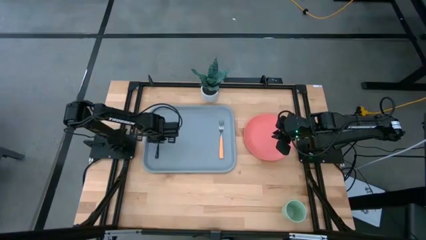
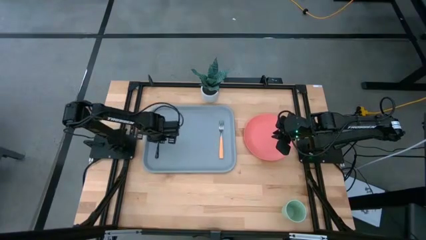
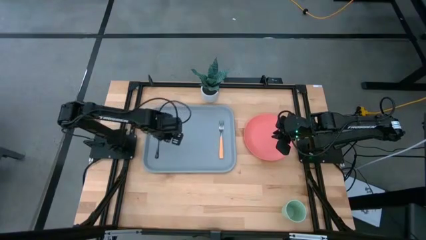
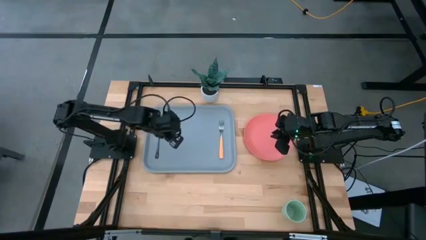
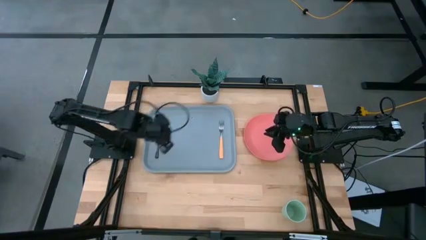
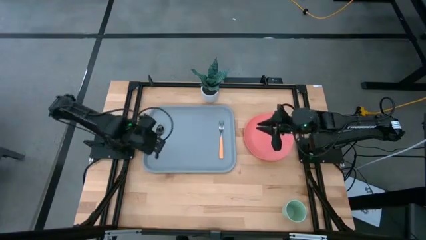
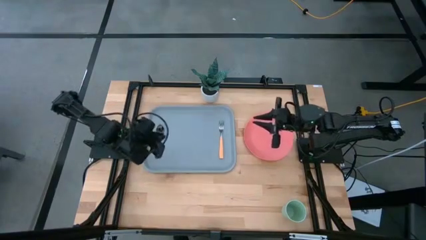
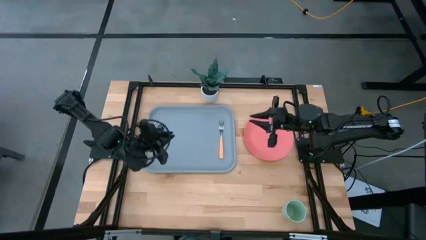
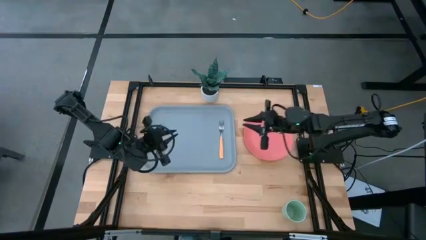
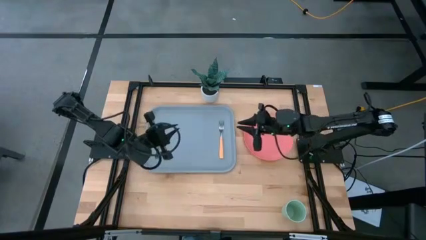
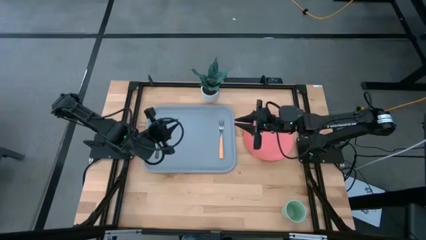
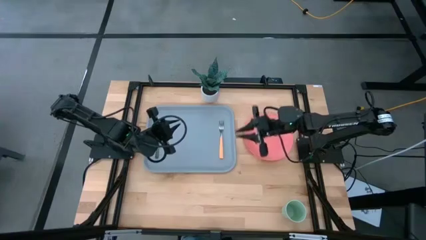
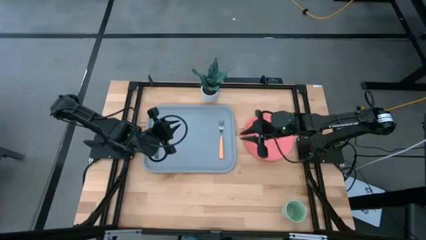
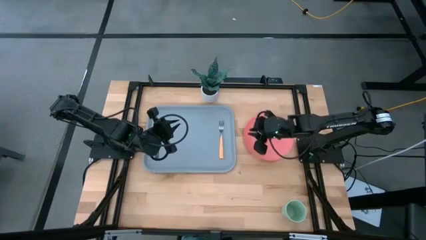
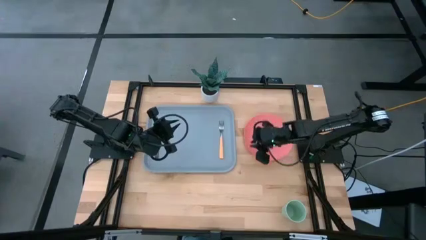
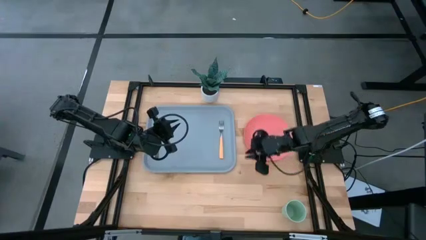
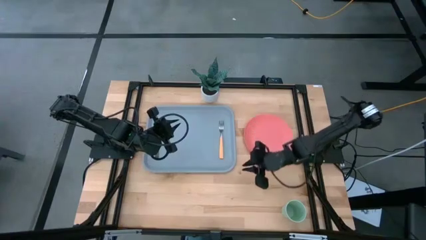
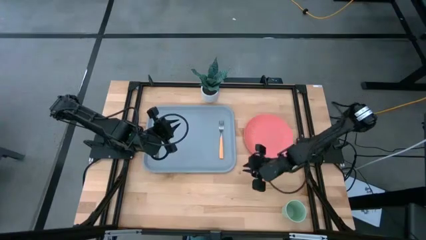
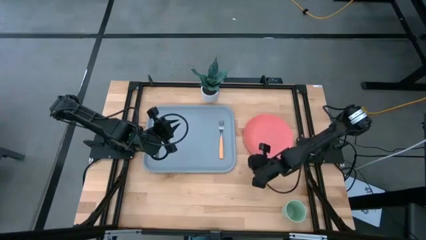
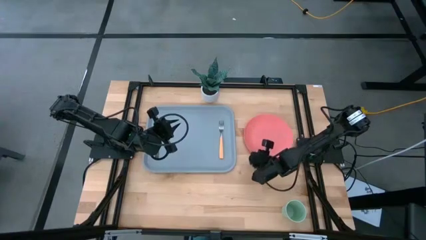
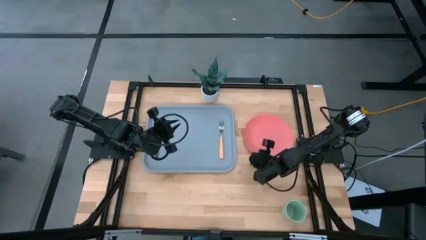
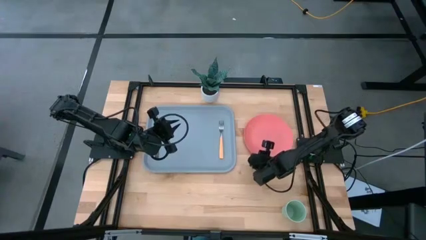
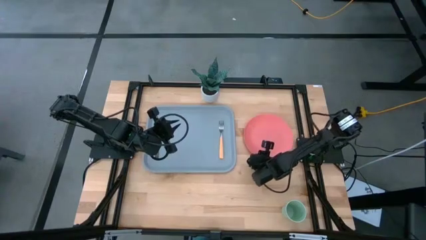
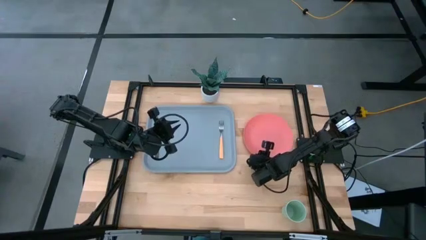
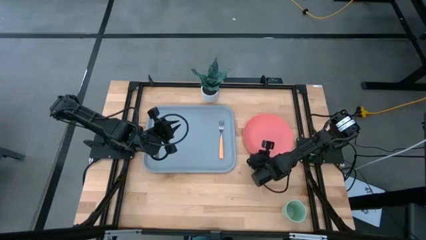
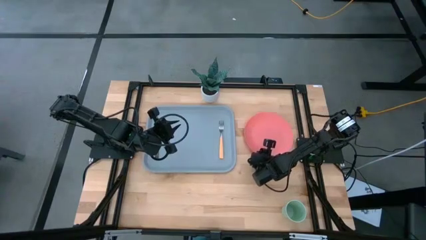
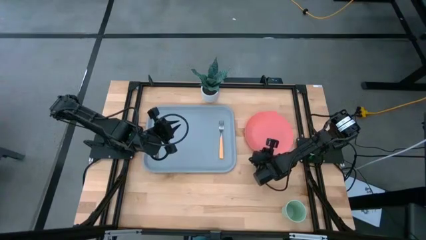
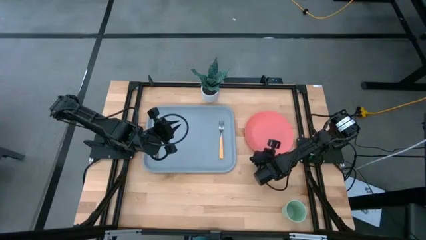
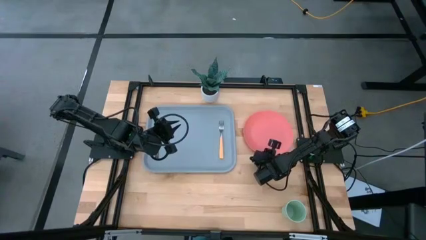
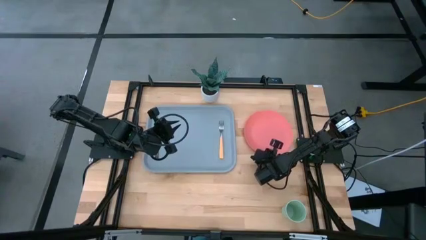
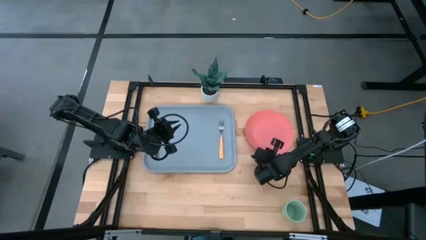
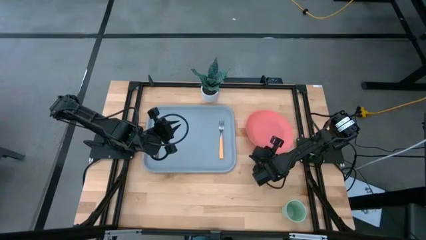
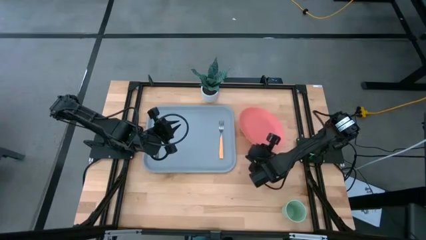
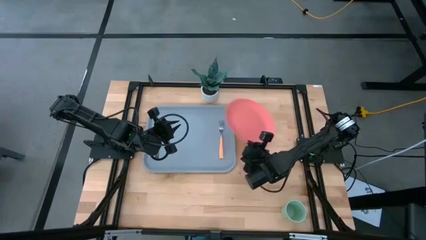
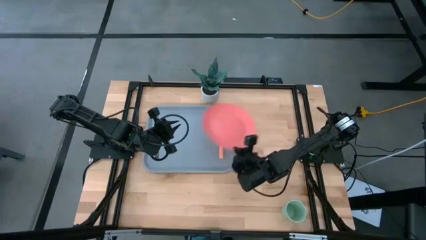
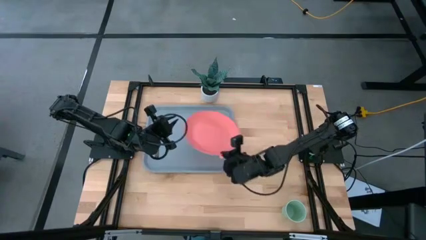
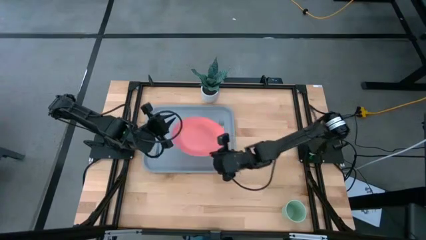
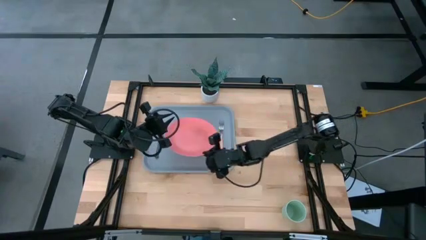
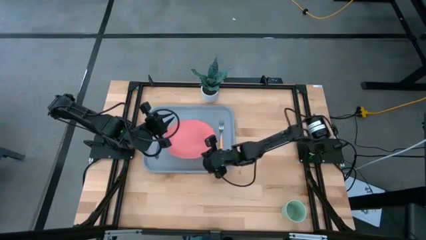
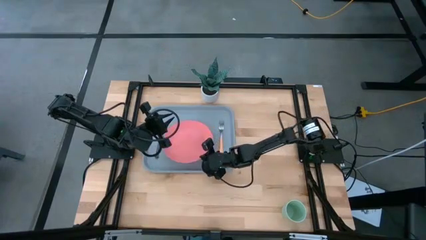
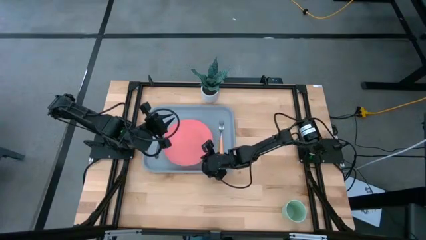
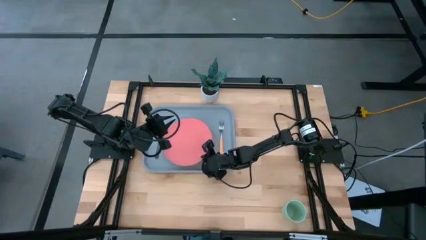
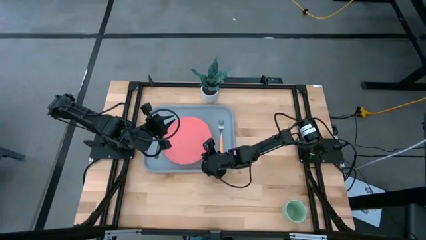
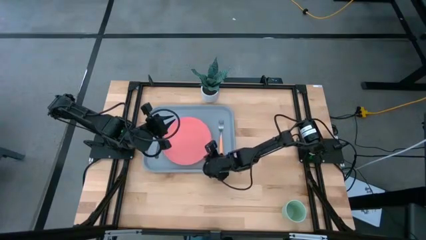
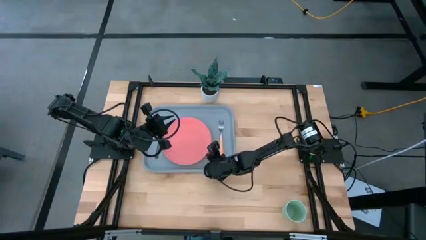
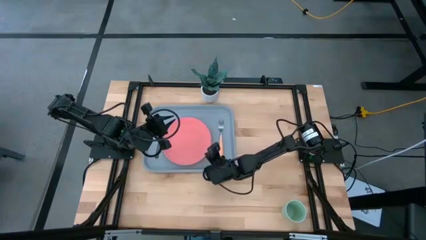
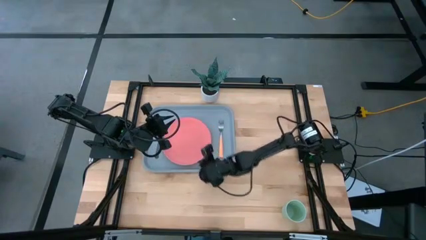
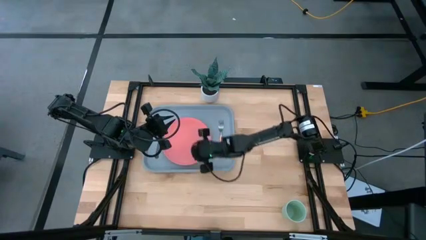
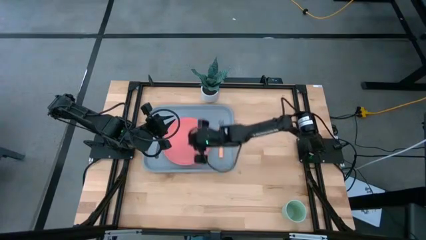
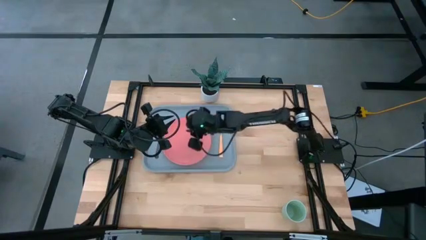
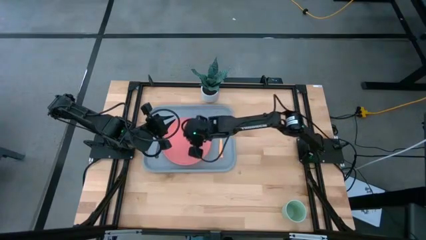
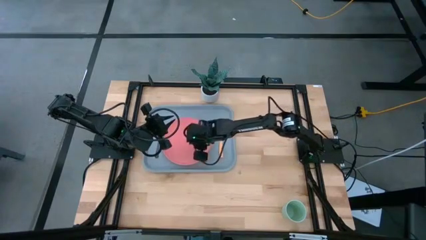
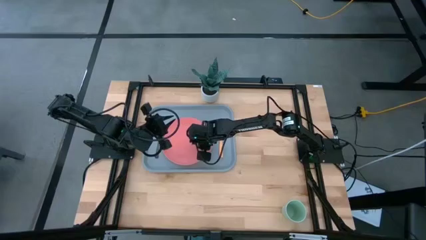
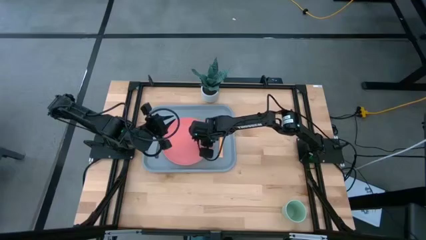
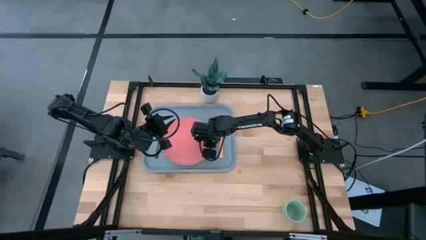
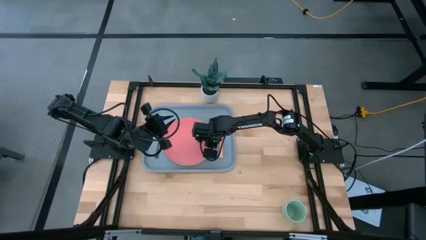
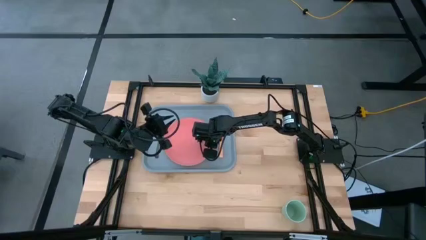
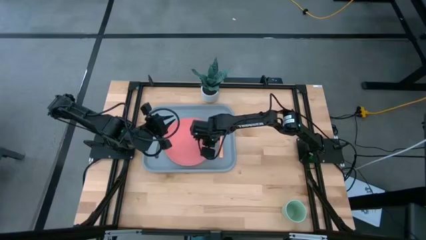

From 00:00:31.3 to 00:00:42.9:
Task: Pick and place plate/cup/fork/spoon on tray
Put the pink plate on the blue table tray

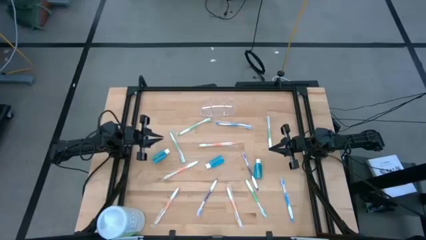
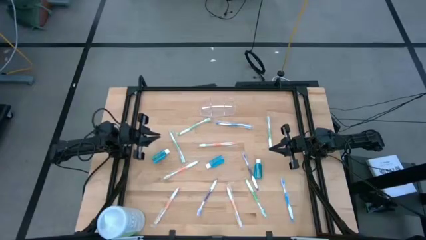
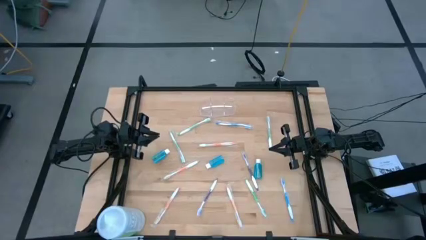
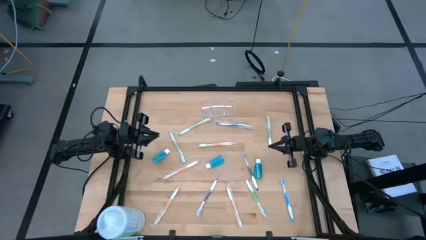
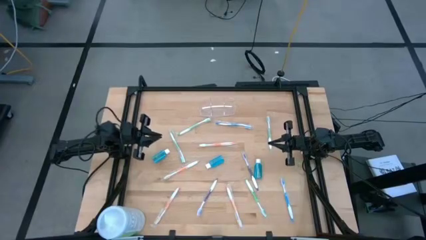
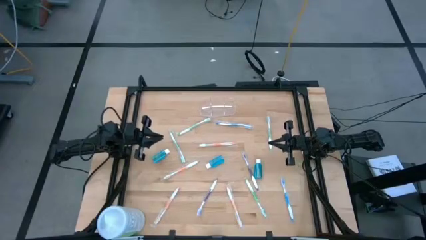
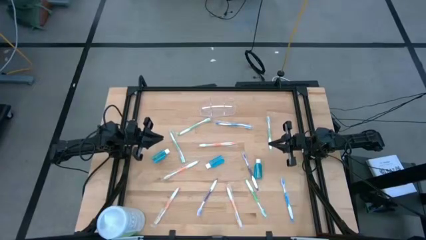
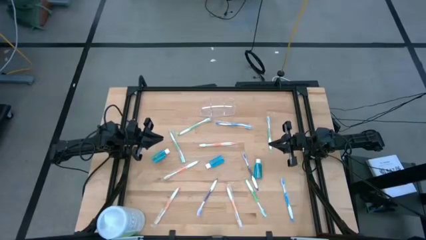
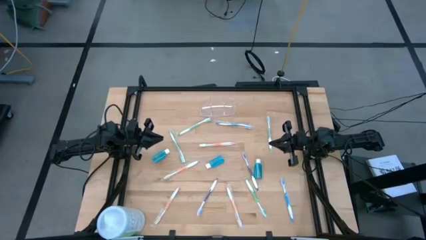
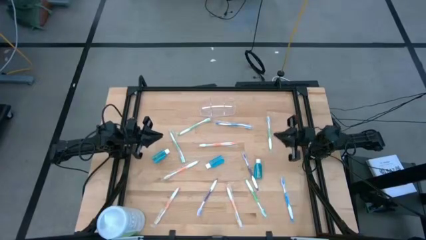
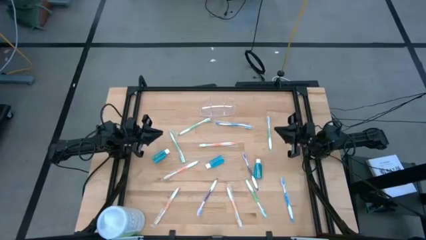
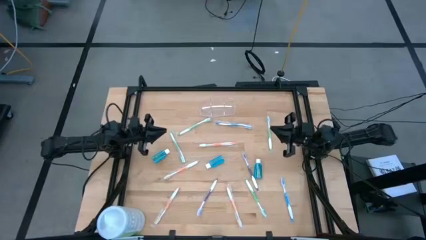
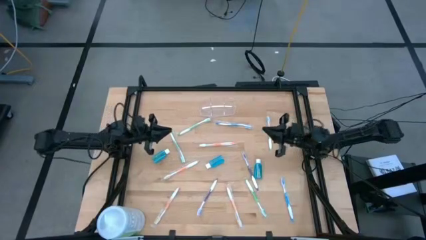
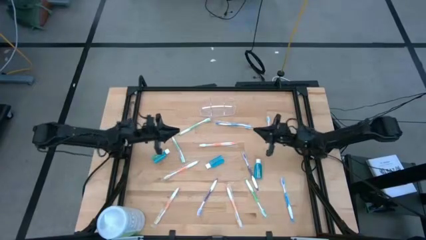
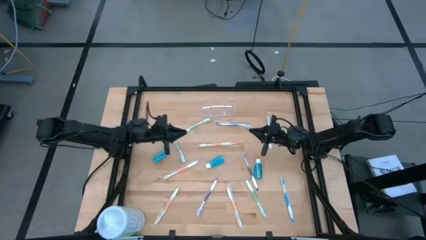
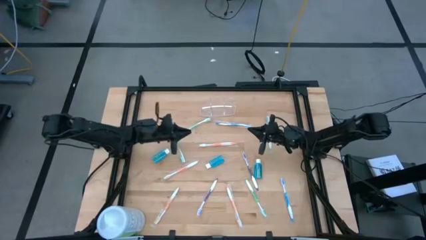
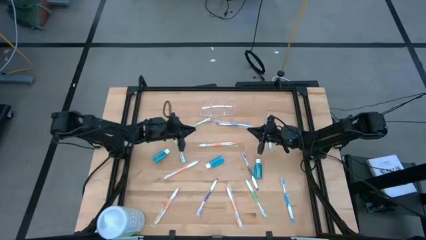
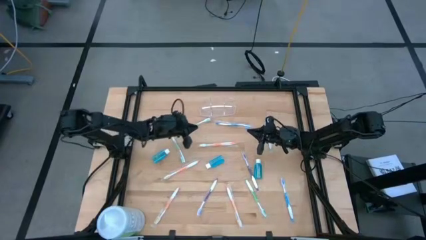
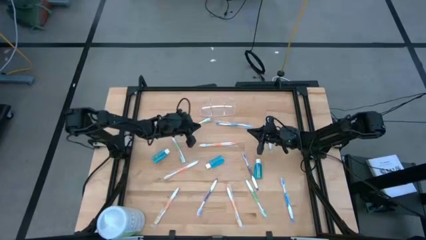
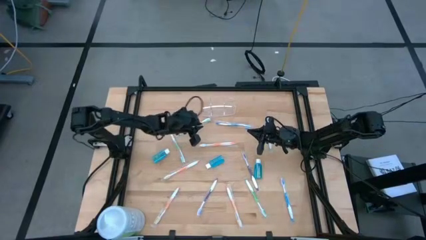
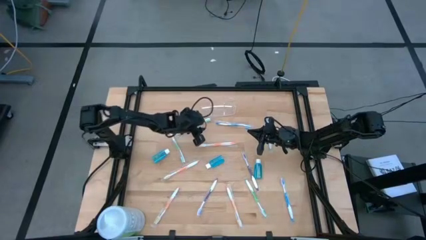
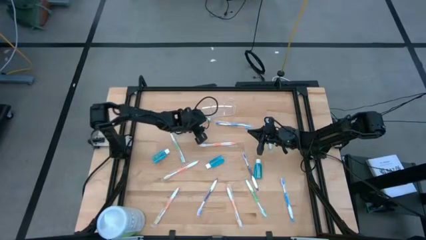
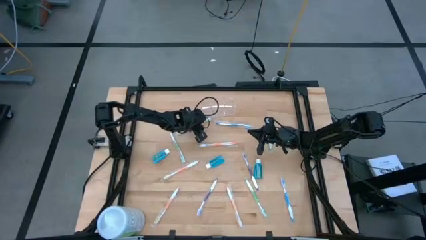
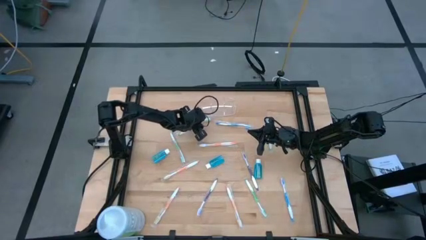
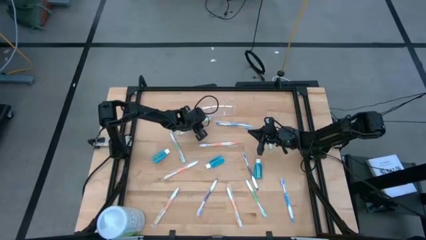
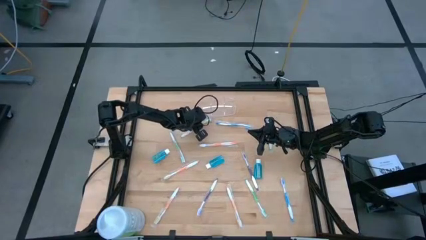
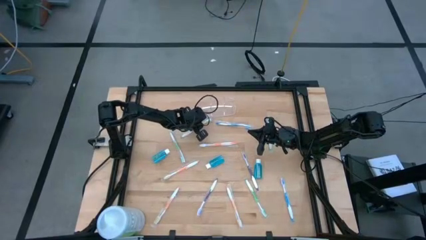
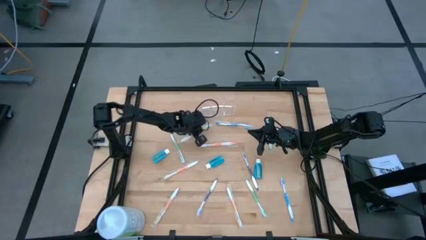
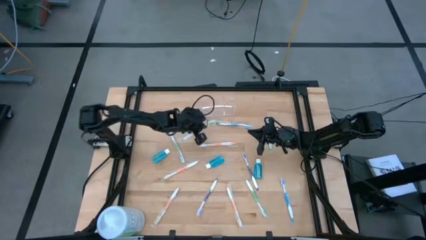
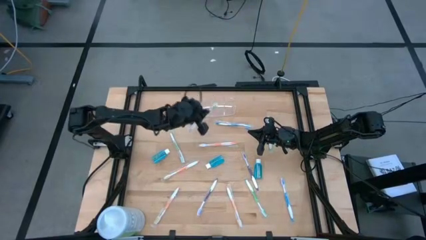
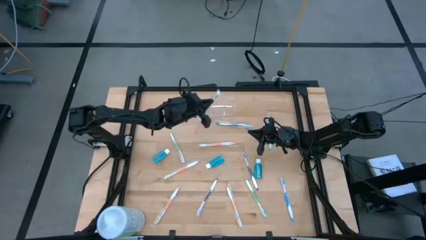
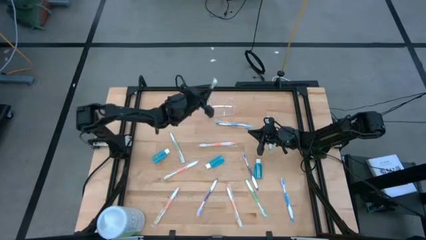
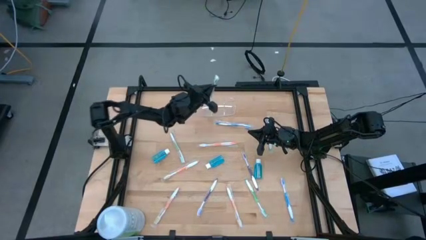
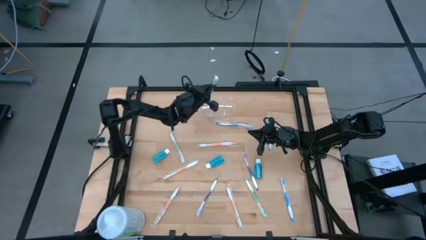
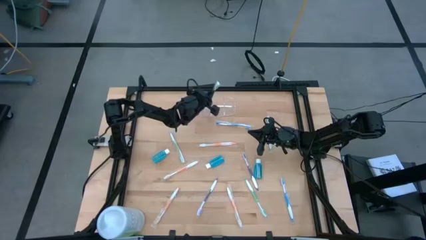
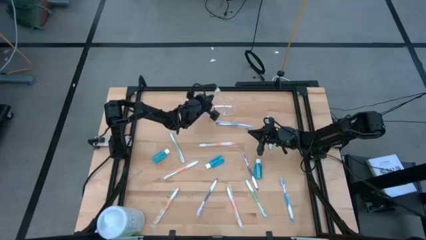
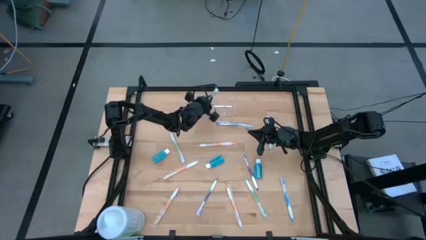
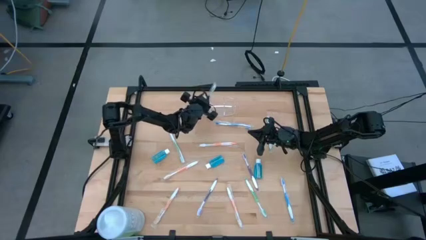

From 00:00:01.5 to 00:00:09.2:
Task: Pick & Place toothbrushing station
Put the green toothbrush into the transparent organizer
